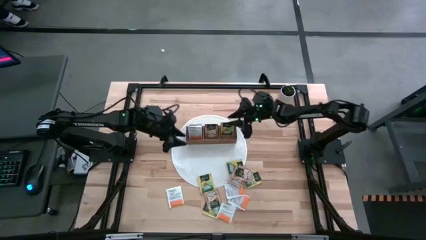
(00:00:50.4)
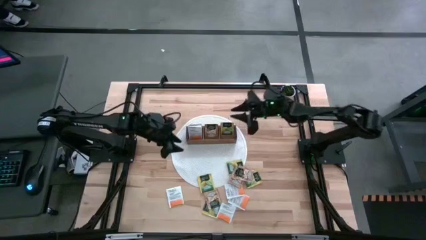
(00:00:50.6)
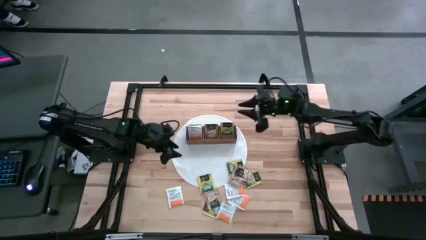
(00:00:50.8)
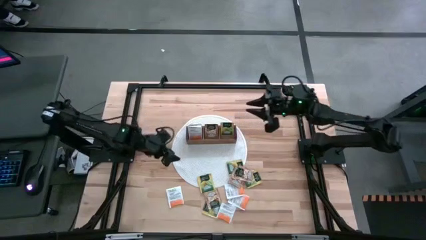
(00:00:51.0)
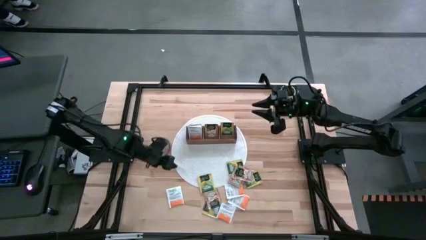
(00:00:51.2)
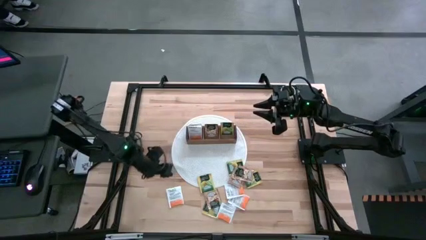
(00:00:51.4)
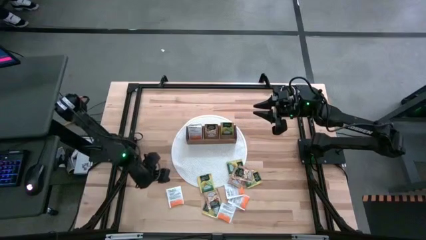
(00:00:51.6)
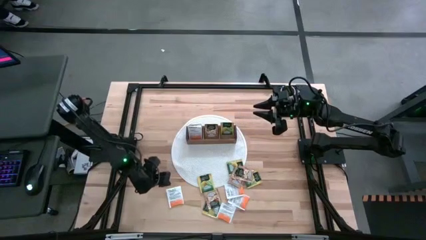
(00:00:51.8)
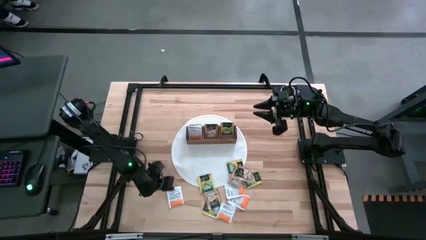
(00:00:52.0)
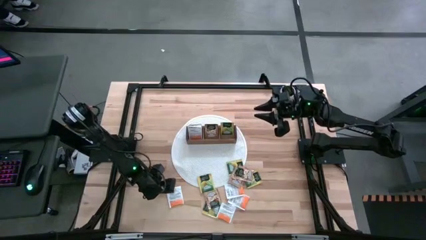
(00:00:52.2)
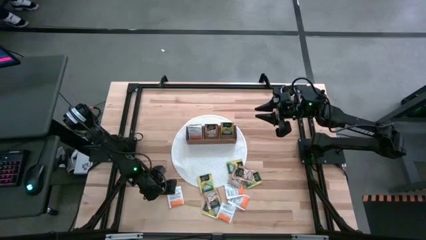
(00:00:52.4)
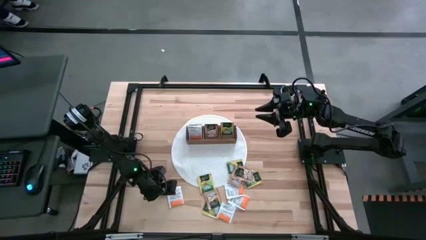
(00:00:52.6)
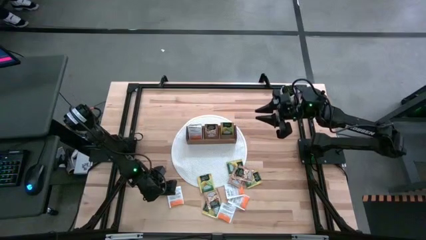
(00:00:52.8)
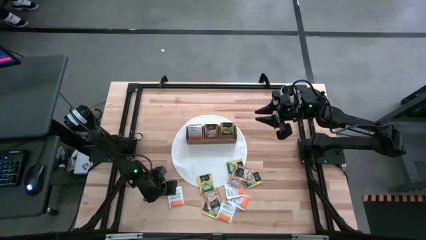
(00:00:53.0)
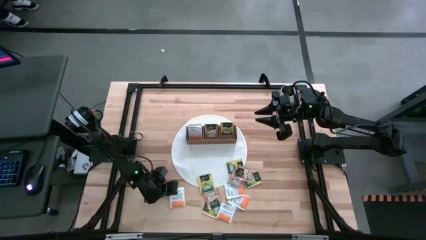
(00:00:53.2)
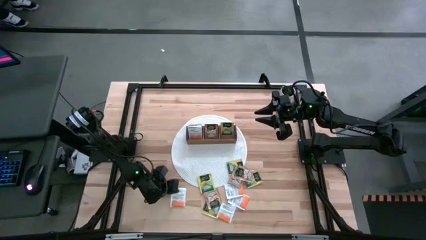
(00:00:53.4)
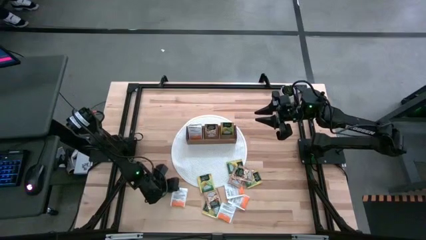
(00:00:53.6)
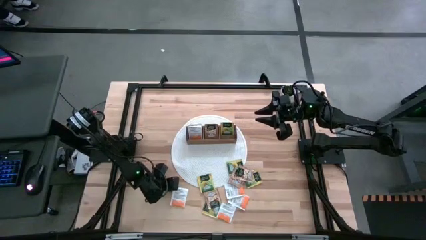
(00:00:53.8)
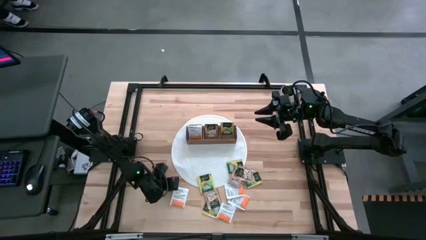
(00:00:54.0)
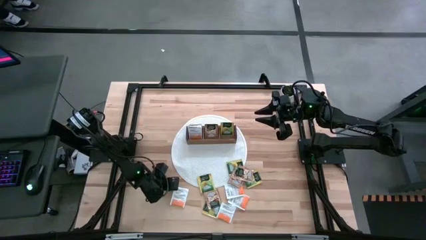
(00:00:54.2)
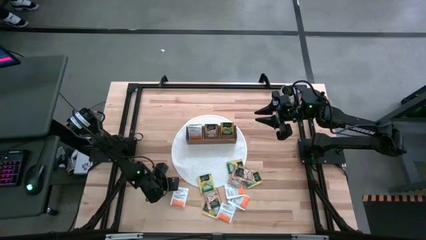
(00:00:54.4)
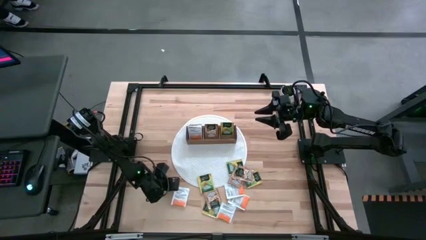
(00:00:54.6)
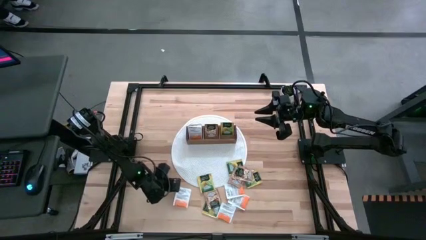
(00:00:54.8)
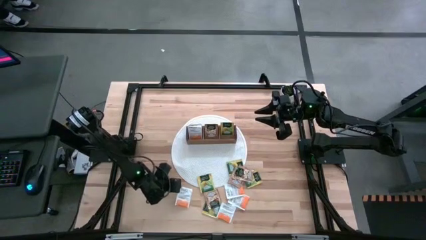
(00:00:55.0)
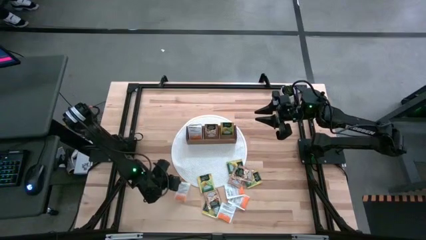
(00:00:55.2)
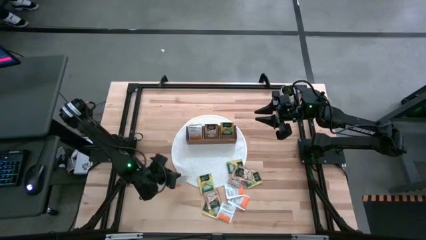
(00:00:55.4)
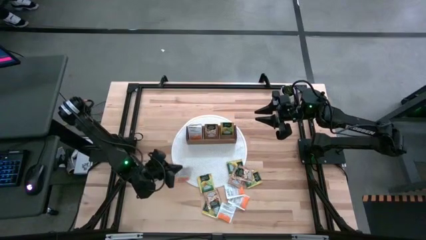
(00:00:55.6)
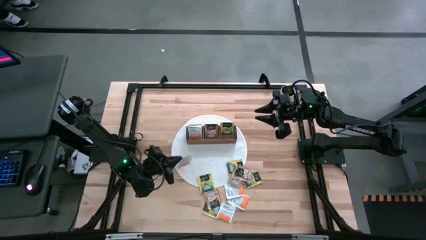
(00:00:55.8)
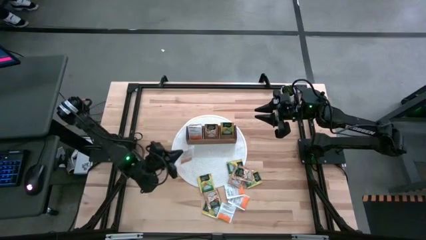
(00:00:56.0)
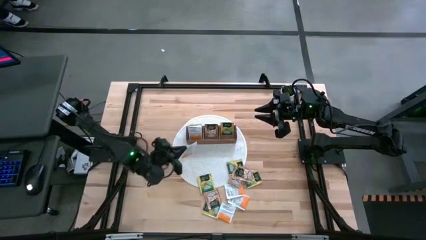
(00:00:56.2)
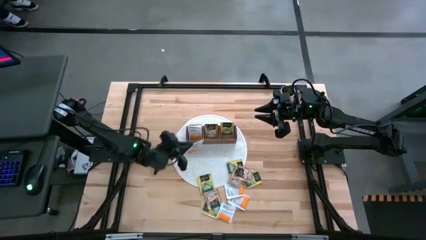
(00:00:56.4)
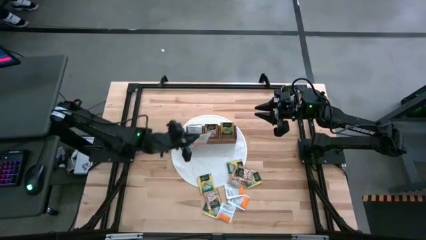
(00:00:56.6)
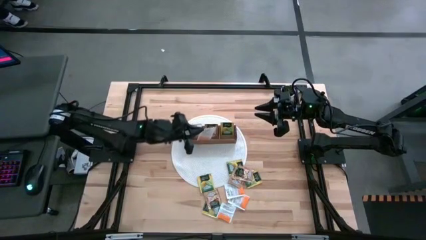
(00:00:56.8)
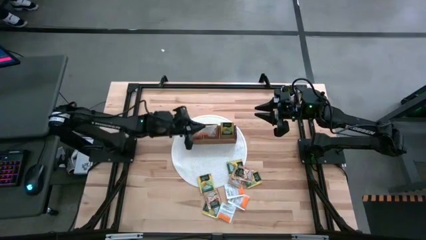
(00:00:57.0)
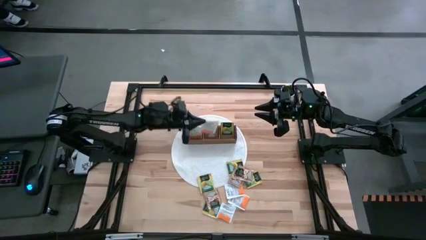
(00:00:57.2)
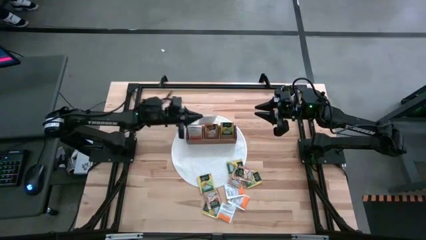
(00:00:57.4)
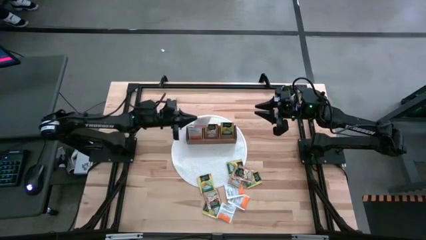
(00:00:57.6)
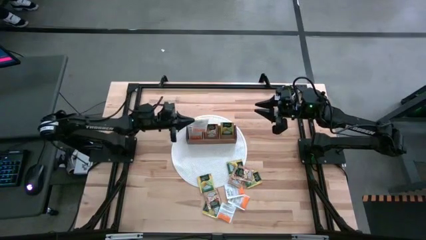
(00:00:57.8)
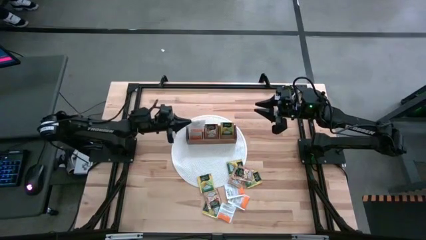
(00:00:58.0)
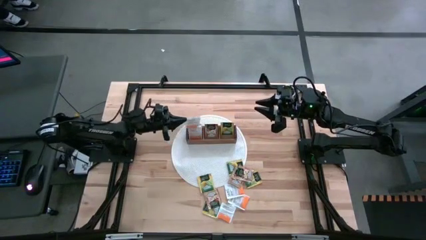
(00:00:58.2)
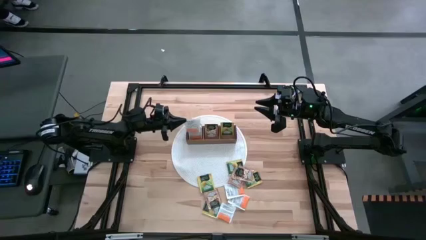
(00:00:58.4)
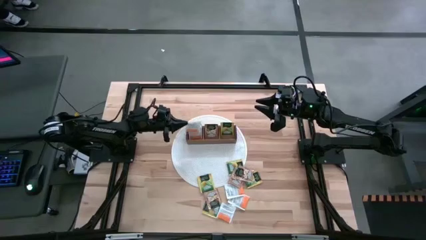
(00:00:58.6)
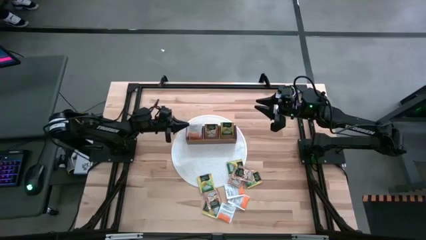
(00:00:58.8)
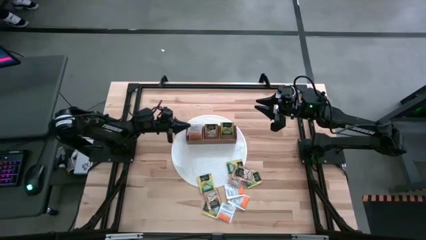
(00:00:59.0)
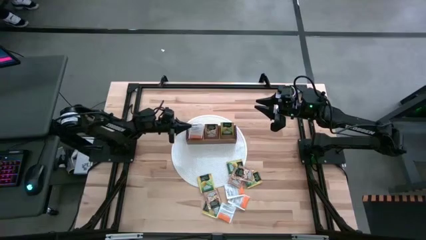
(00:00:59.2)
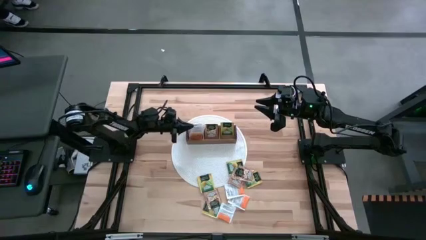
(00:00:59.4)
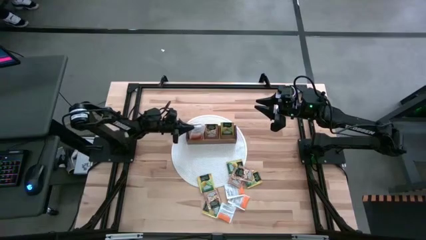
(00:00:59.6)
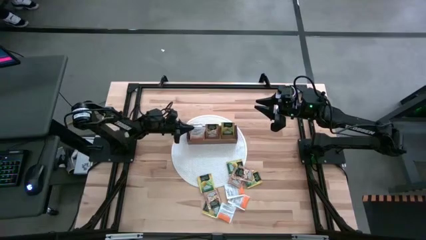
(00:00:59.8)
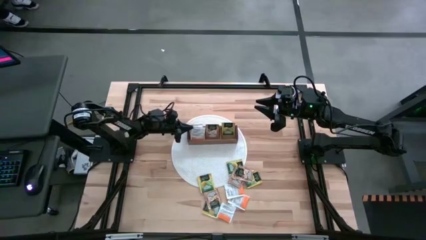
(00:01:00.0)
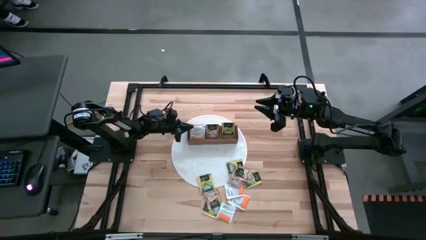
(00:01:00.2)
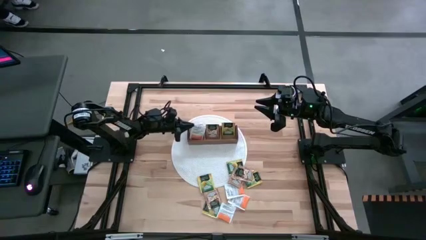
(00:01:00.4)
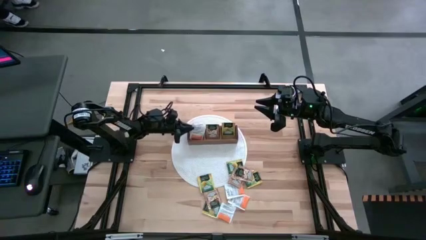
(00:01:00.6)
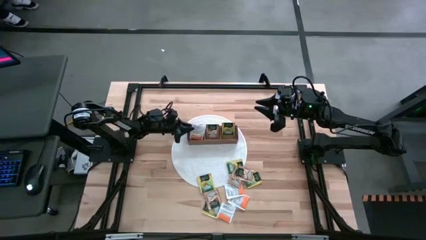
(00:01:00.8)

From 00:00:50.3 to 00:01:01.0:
Task: Pick & Place Tea
Put the orange tea bag into the left section of the wooden organizer

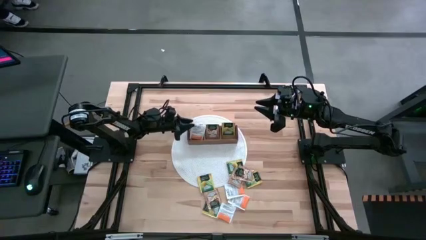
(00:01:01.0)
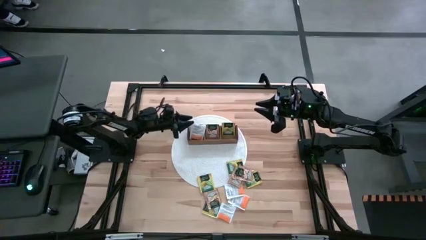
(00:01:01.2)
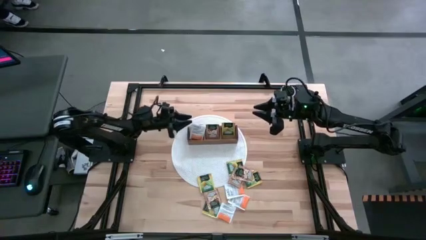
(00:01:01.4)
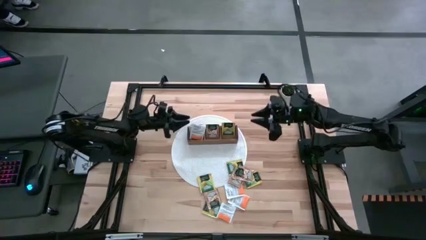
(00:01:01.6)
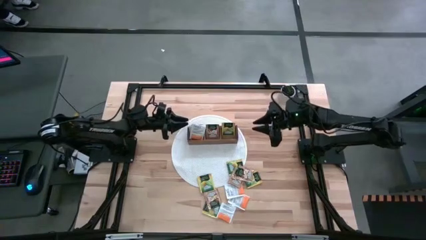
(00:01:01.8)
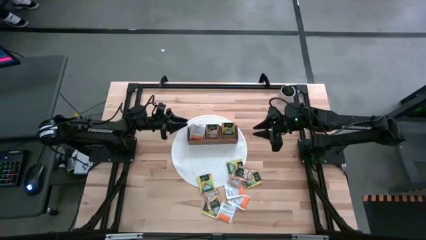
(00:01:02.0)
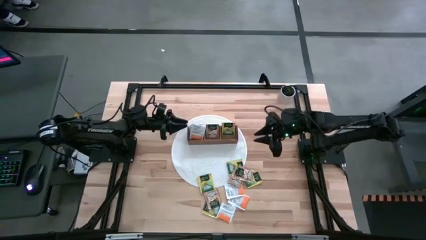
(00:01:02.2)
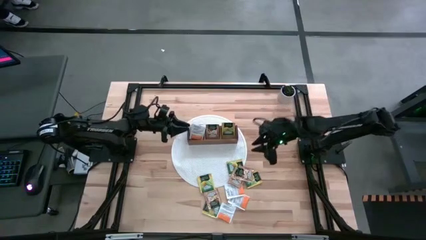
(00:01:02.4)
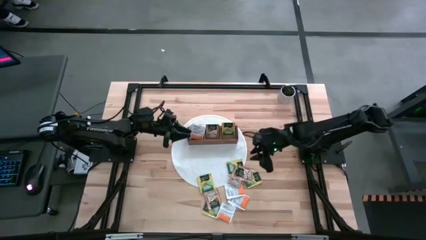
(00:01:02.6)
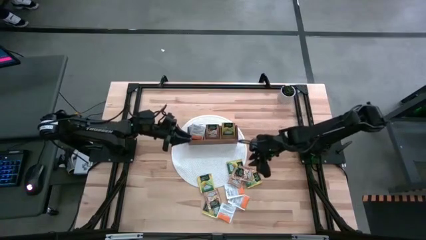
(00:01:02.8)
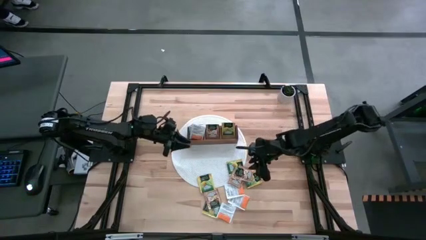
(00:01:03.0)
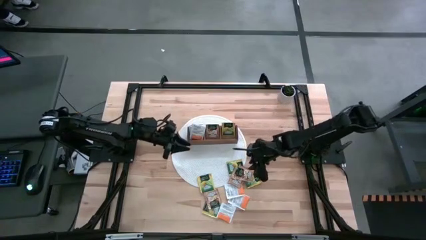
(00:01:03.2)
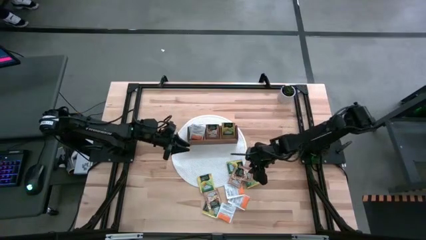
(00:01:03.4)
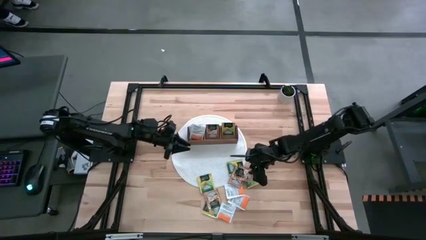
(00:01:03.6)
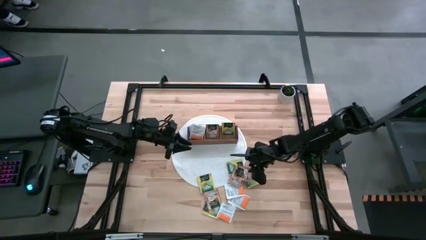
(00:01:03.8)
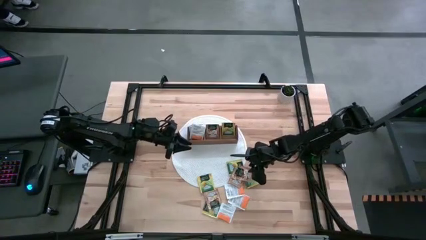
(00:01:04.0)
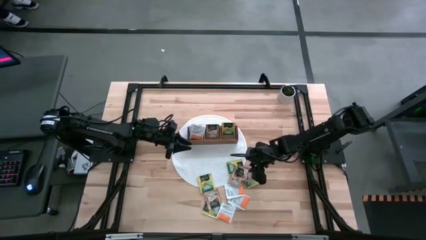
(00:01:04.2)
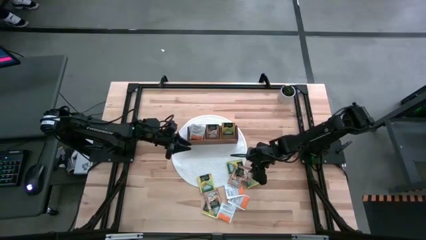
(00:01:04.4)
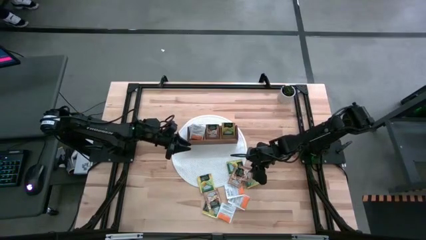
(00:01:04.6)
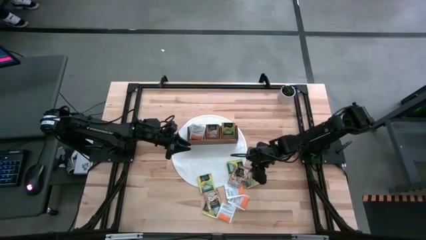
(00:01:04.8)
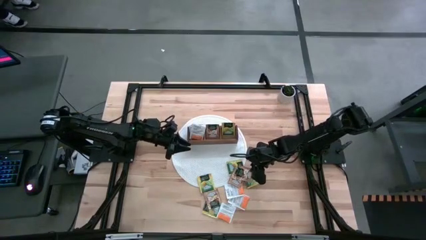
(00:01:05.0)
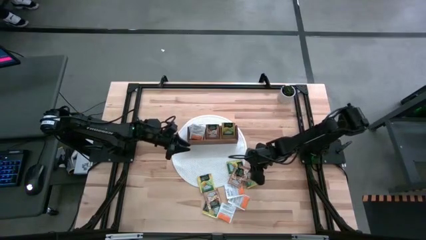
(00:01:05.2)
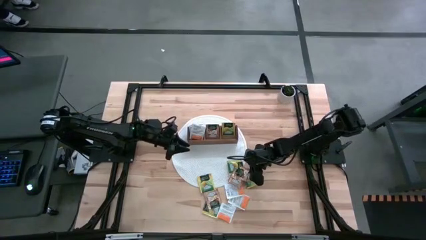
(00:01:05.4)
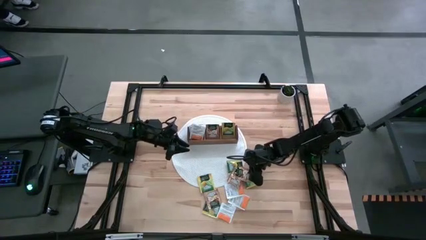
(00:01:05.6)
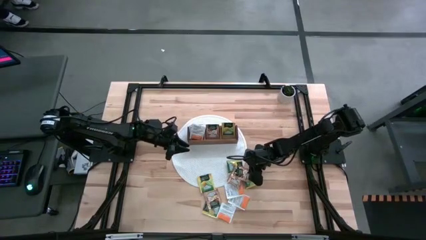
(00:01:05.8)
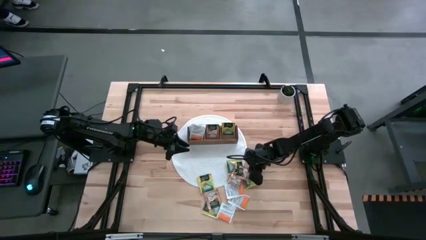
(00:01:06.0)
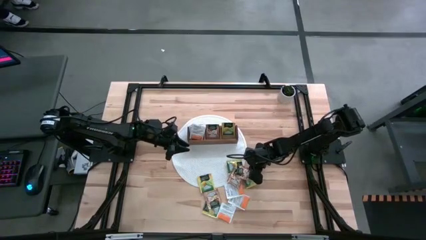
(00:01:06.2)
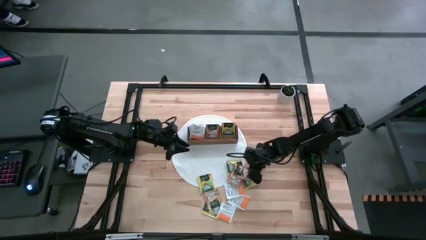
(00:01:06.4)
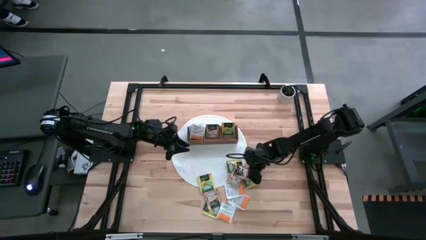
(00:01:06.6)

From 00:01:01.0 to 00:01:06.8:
Put the brown tea bag into the middle section of the wooden organizer

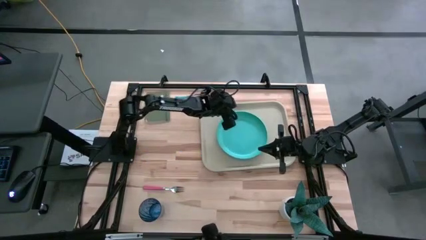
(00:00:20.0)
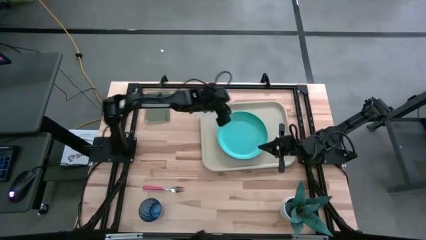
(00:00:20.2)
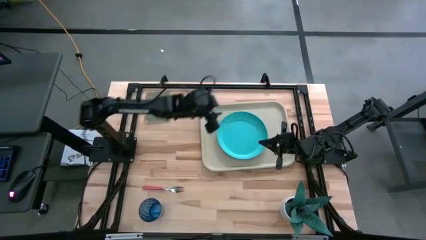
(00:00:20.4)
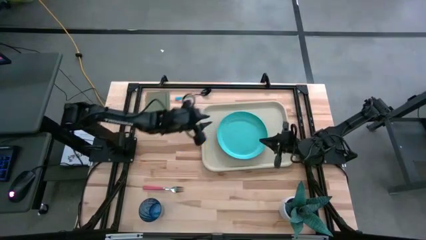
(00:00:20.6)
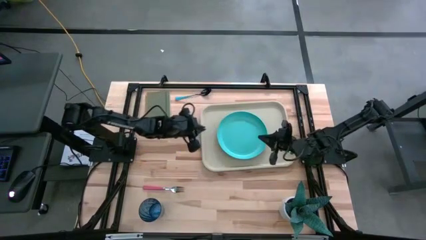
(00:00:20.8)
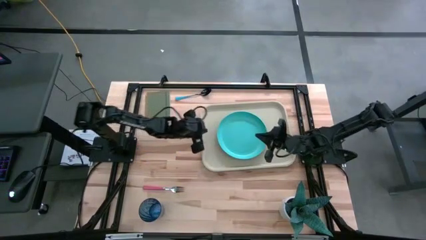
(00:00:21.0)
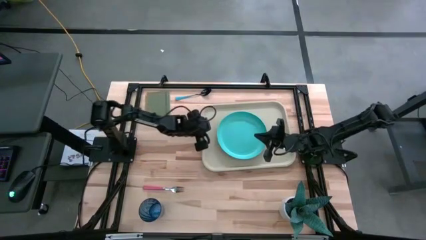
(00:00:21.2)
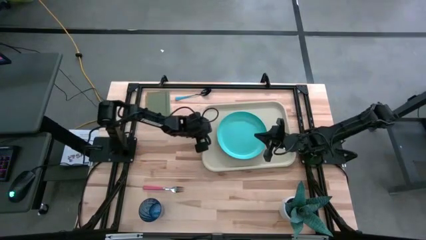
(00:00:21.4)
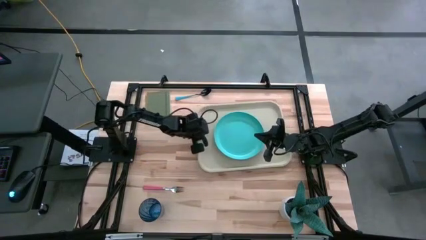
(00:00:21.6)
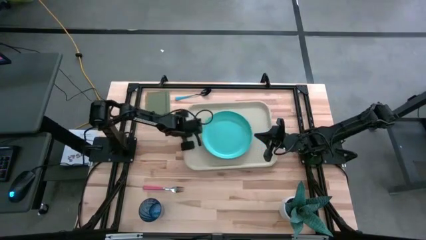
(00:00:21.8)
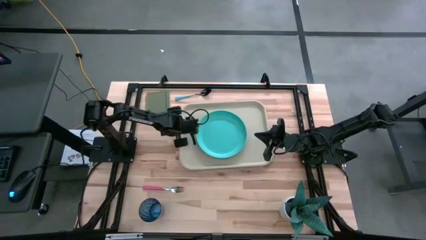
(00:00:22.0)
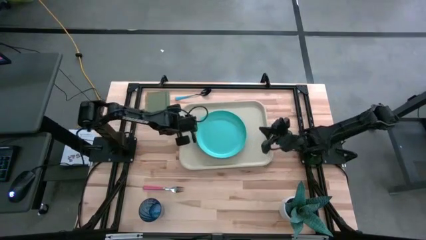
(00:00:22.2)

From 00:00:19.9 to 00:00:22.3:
Task: Pick and place plate/cup/fork/spoon on tray
Adjust the gray serving tray
